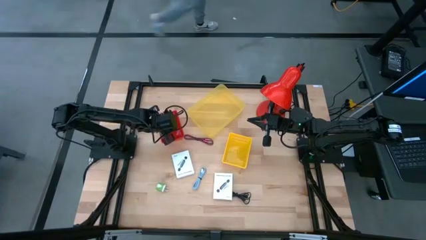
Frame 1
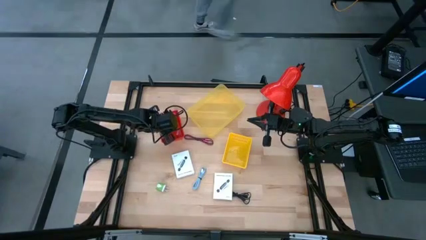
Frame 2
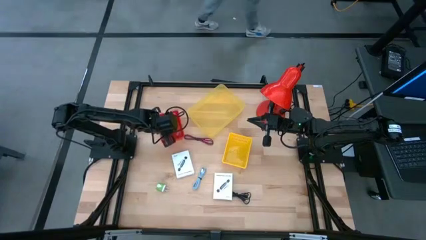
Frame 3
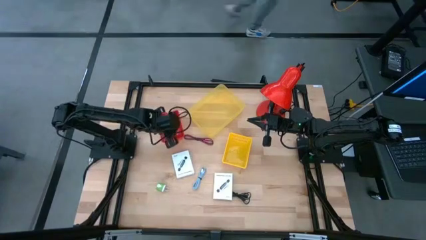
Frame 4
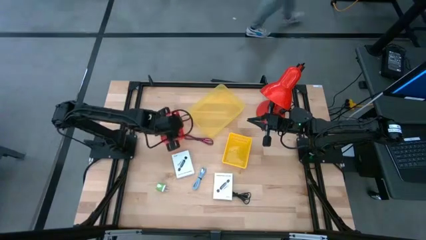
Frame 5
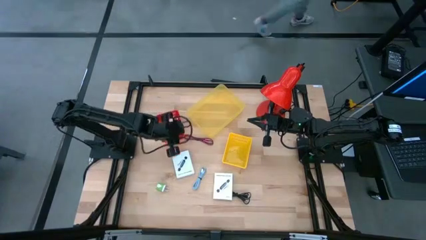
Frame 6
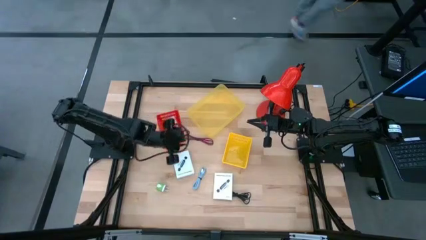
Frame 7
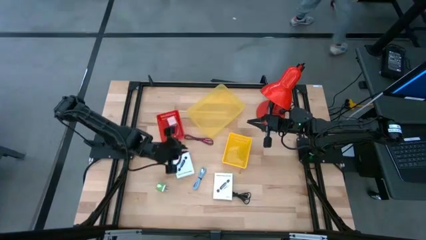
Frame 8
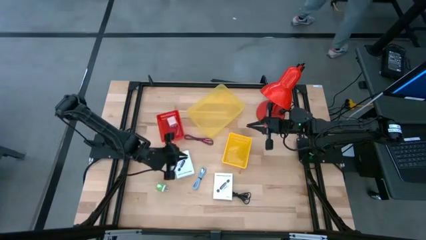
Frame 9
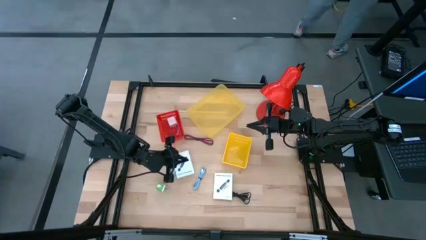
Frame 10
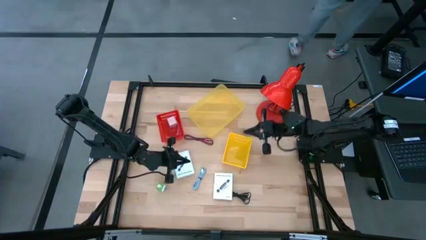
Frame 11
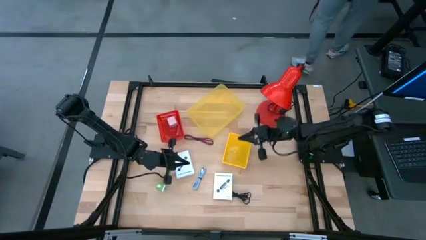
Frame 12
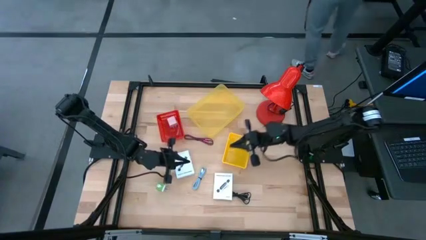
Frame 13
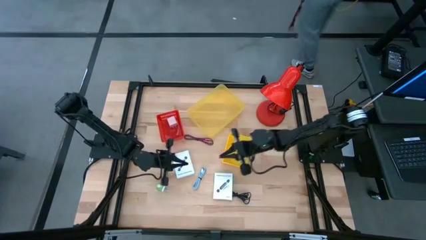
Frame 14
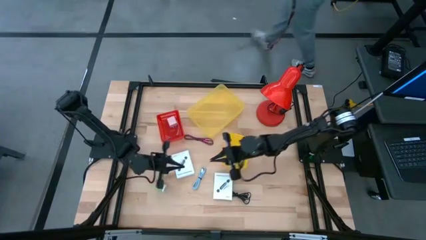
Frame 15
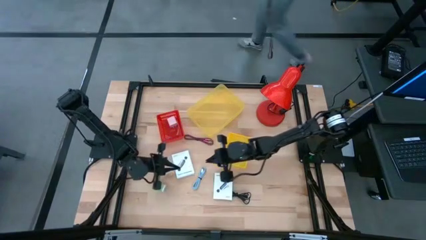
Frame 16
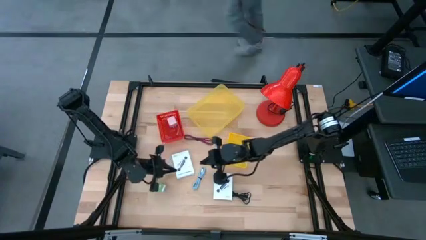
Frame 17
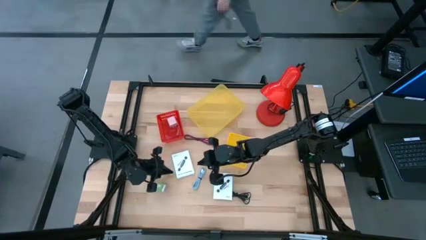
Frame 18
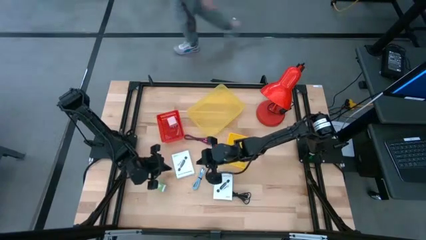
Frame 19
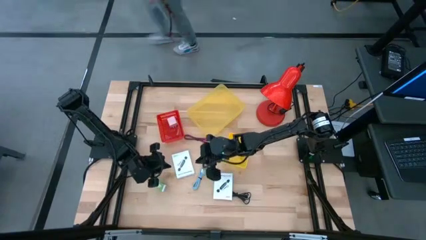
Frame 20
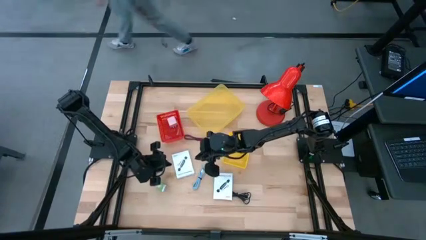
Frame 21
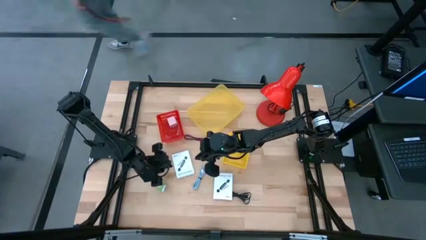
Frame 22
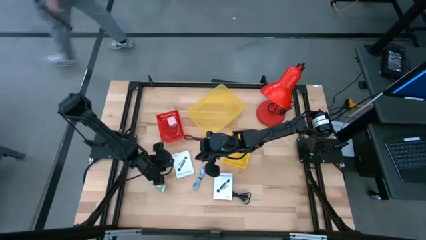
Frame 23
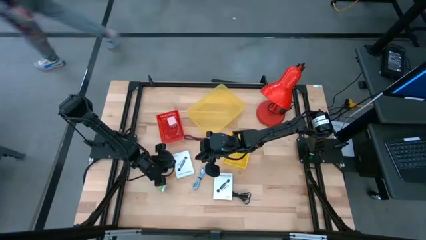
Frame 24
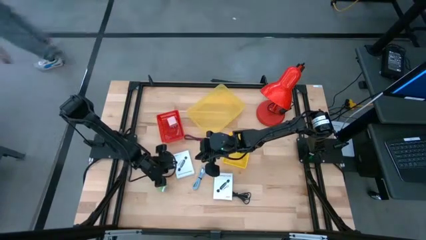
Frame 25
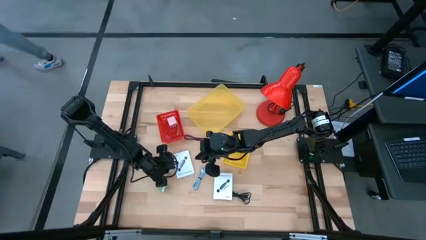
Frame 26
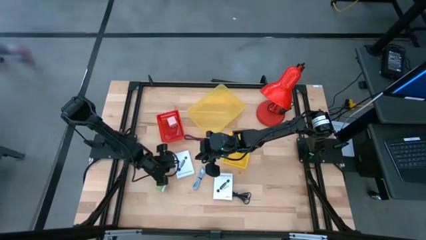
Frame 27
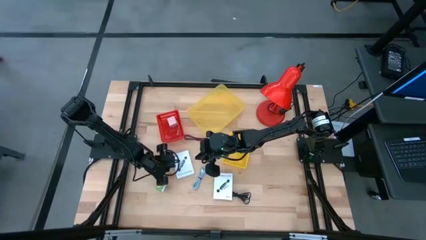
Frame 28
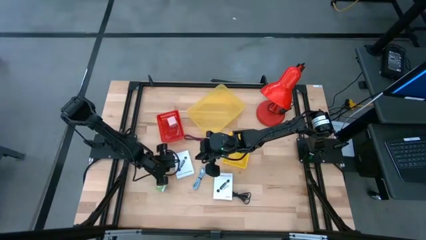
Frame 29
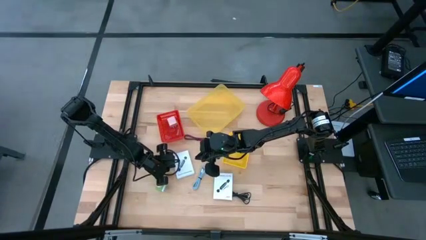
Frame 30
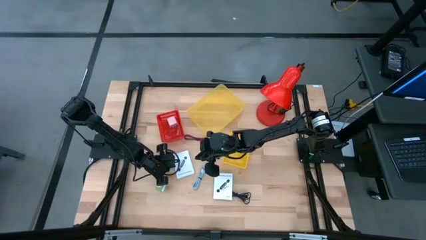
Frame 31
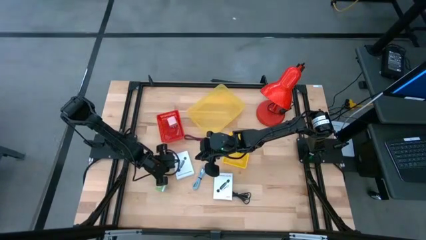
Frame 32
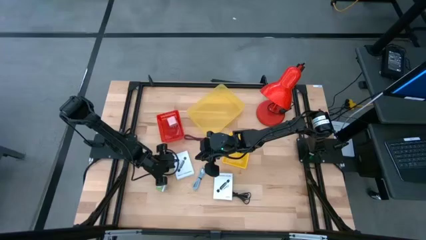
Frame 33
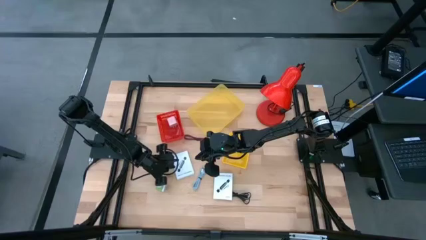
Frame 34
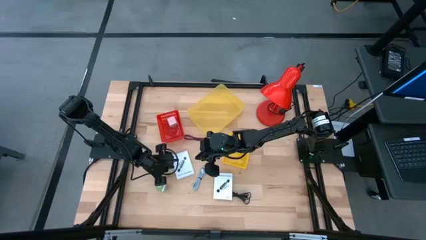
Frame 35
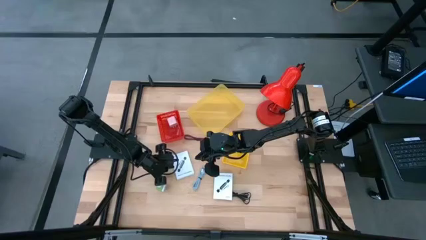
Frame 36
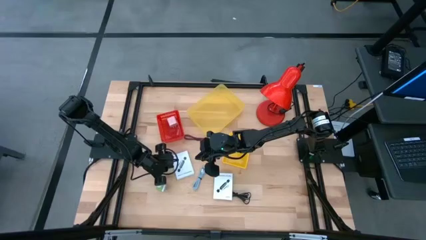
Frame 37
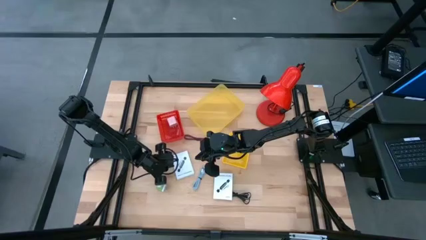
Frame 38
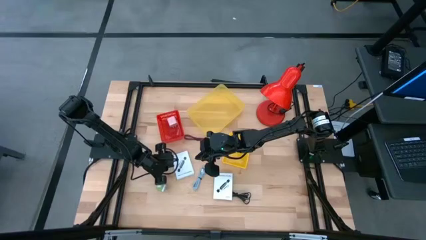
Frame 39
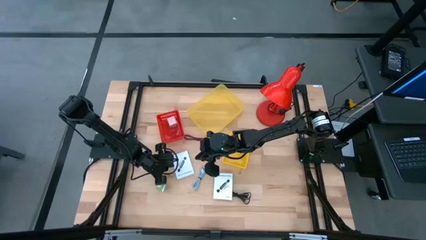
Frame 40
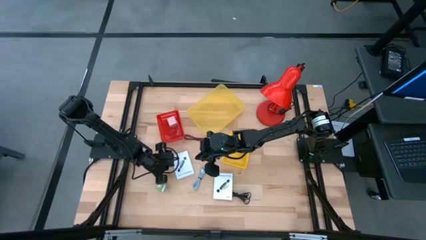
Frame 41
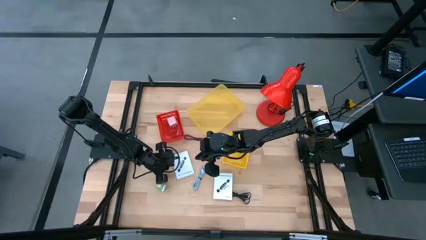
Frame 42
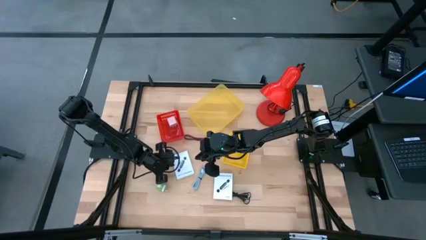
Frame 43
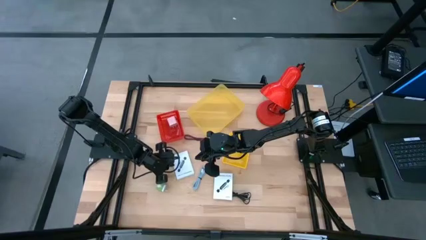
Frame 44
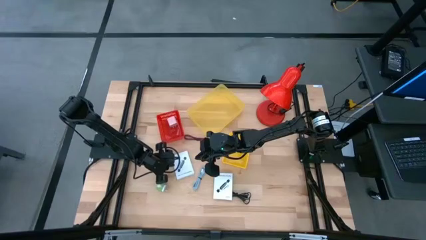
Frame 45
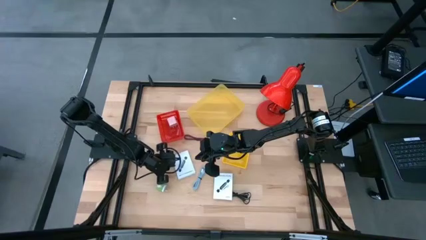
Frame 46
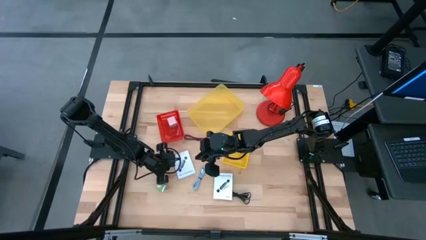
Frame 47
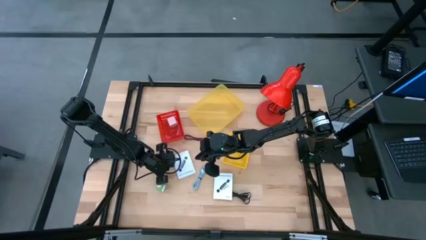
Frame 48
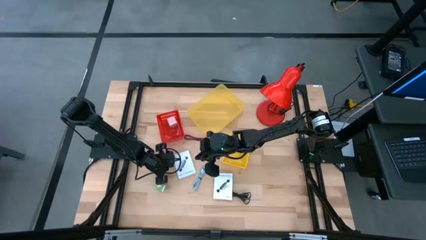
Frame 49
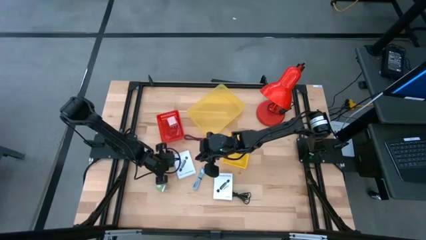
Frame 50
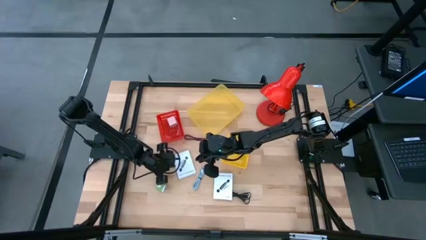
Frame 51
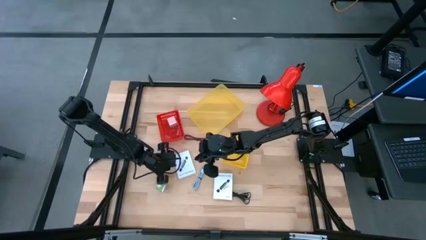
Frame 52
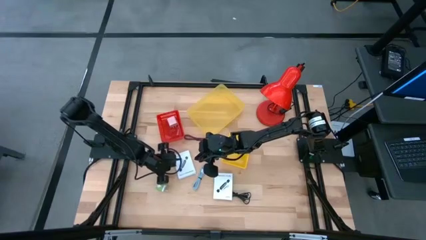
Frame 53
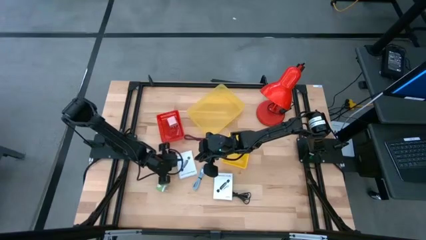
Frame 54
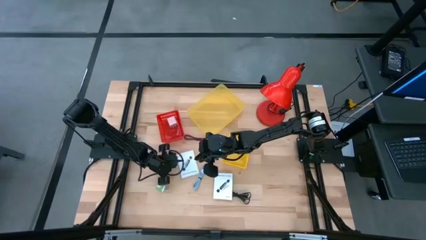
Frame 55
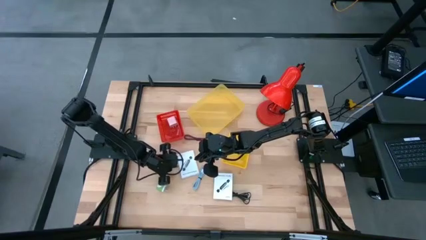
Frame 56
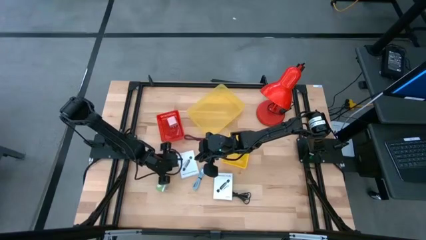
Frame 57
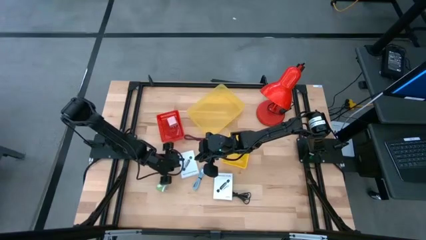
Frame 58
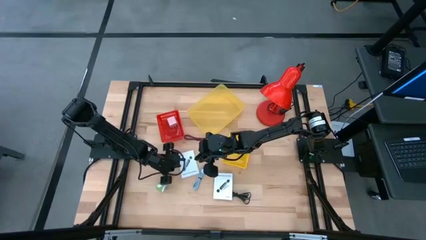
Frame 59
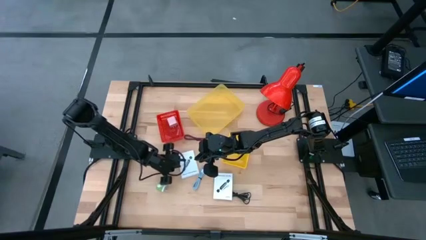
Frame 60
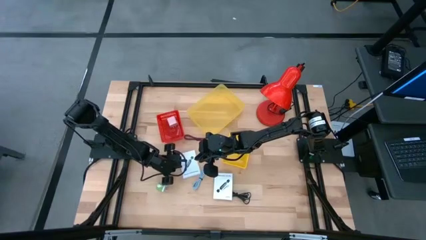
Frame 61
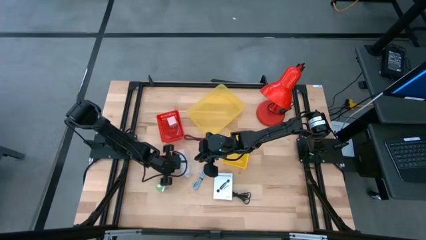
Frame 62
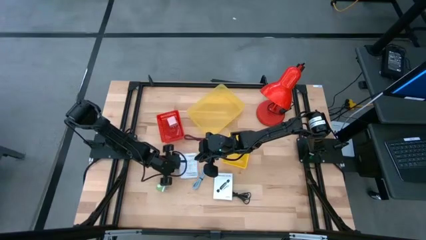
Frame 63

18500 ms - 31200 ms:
Task: Pick and place items into bin
Put the left white box into the small yellow bin
